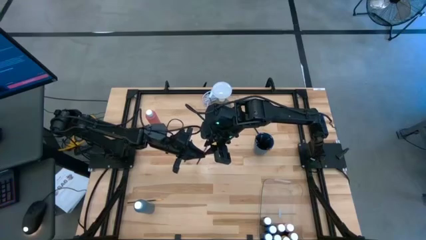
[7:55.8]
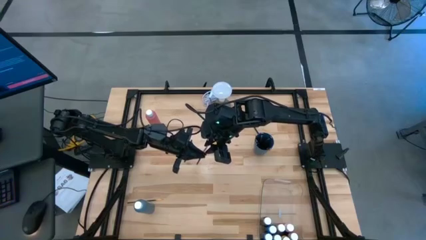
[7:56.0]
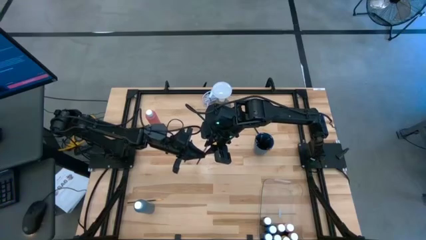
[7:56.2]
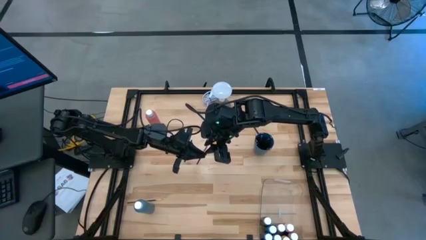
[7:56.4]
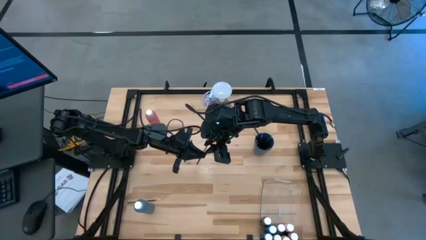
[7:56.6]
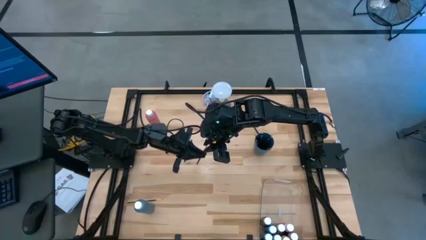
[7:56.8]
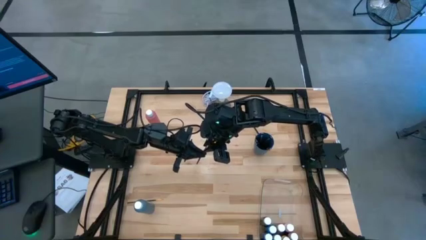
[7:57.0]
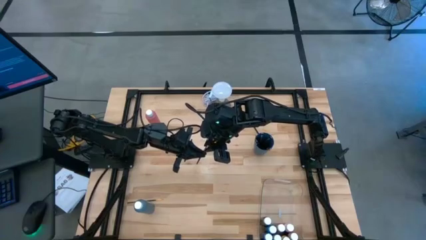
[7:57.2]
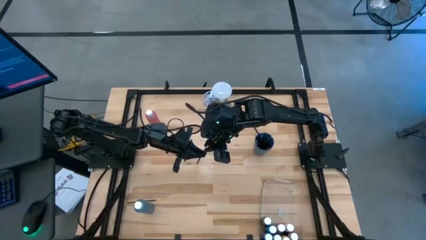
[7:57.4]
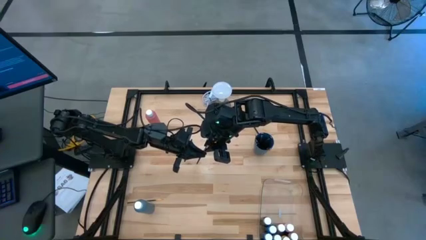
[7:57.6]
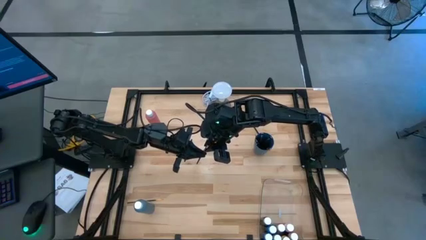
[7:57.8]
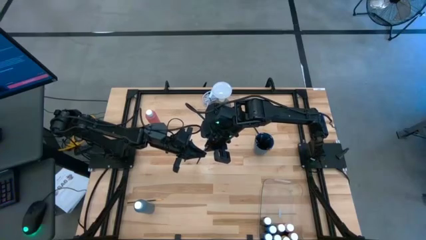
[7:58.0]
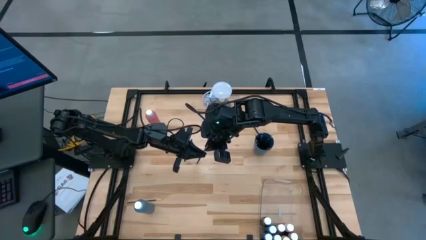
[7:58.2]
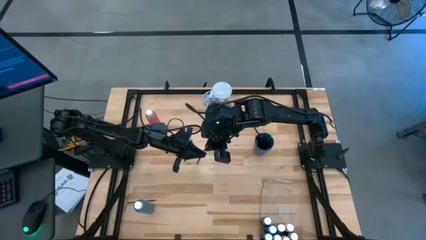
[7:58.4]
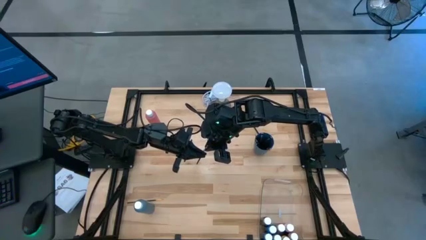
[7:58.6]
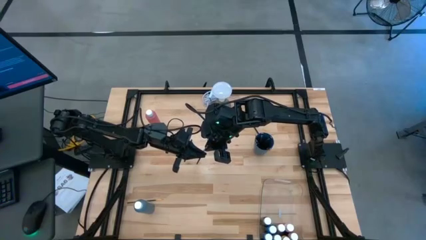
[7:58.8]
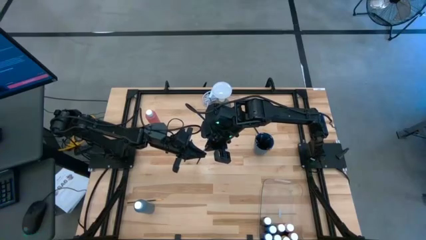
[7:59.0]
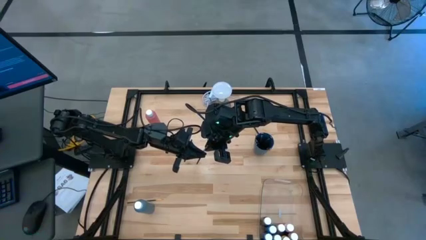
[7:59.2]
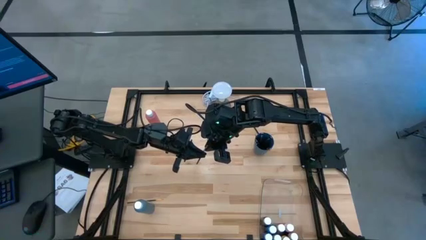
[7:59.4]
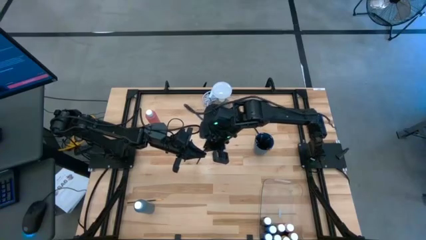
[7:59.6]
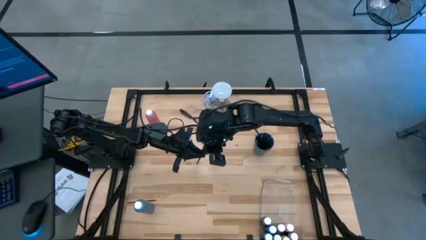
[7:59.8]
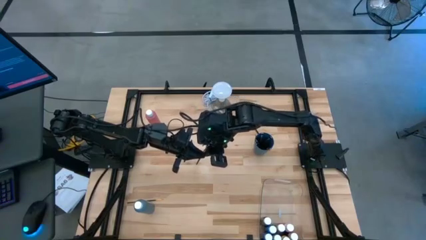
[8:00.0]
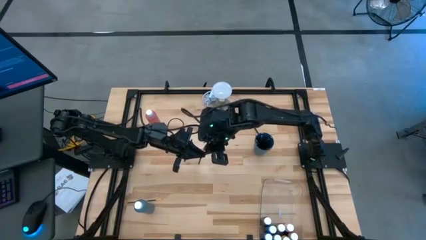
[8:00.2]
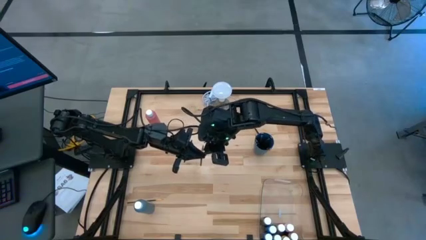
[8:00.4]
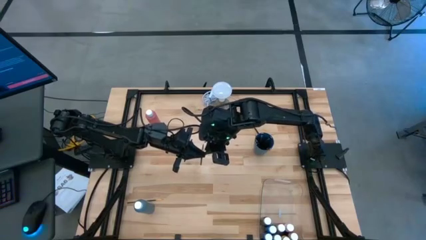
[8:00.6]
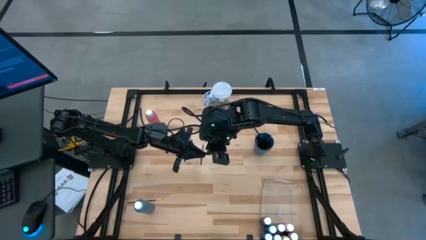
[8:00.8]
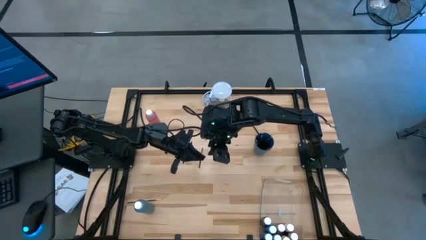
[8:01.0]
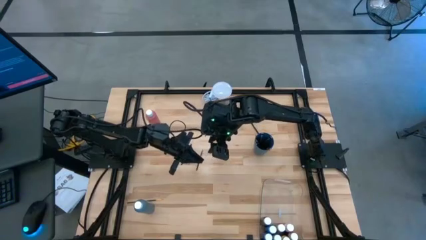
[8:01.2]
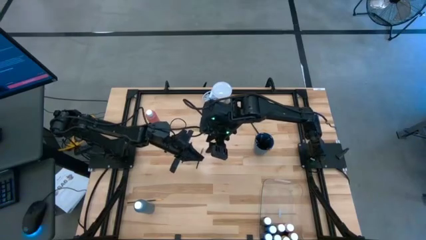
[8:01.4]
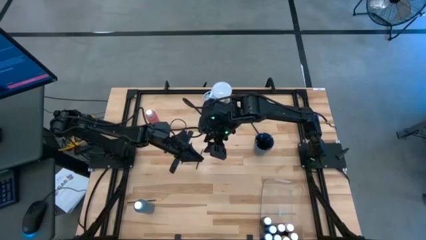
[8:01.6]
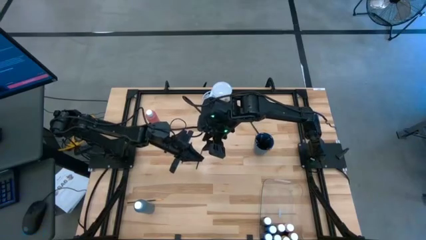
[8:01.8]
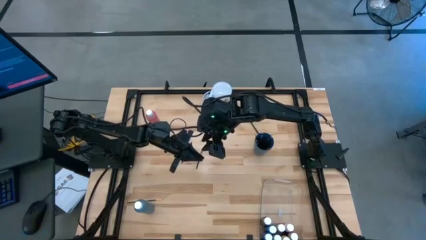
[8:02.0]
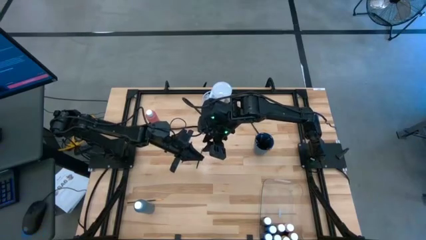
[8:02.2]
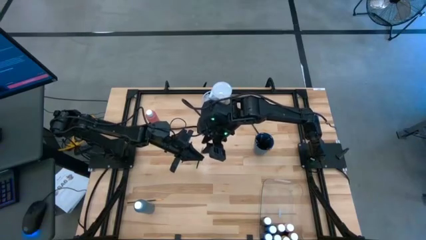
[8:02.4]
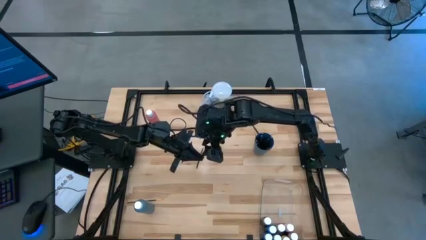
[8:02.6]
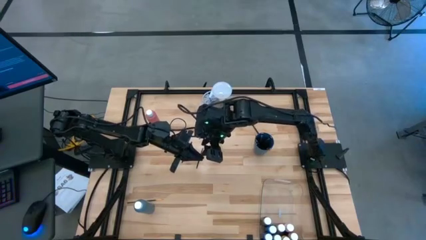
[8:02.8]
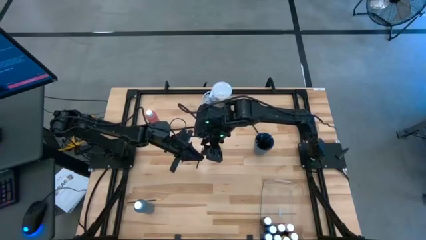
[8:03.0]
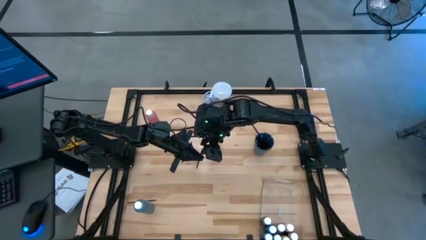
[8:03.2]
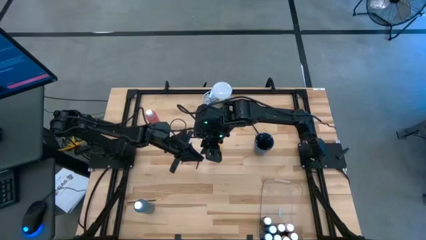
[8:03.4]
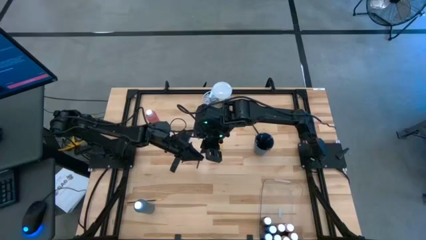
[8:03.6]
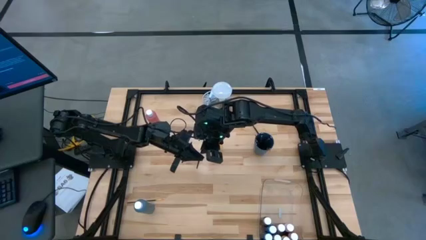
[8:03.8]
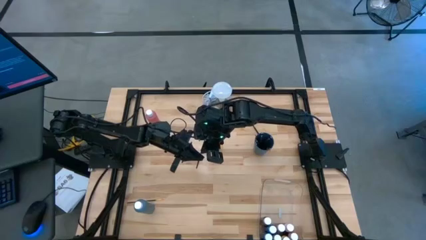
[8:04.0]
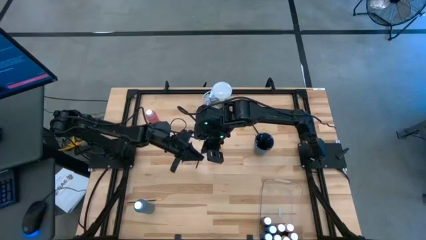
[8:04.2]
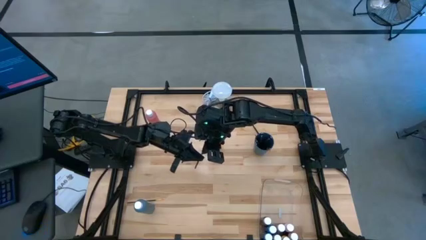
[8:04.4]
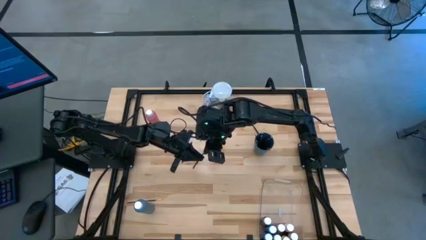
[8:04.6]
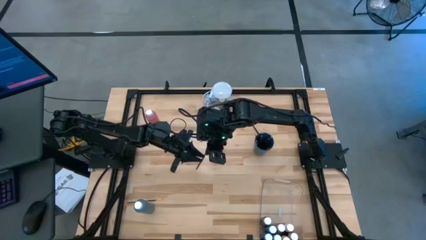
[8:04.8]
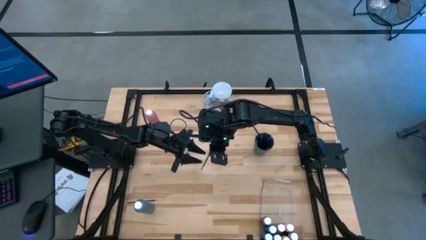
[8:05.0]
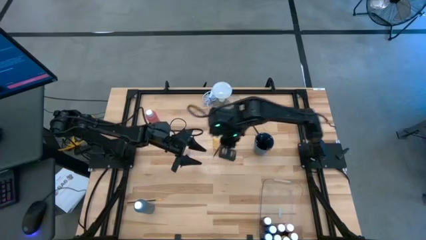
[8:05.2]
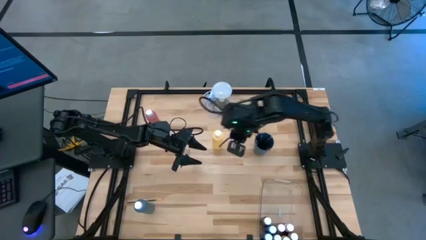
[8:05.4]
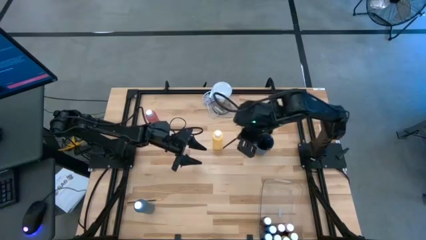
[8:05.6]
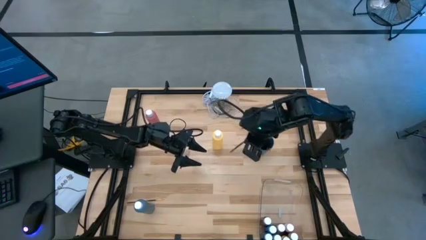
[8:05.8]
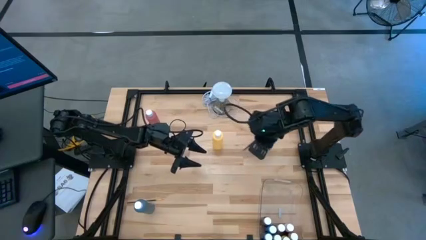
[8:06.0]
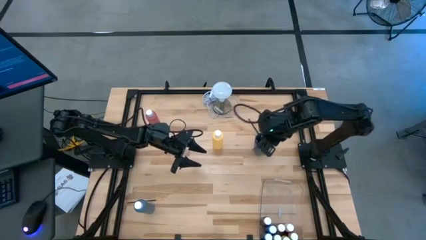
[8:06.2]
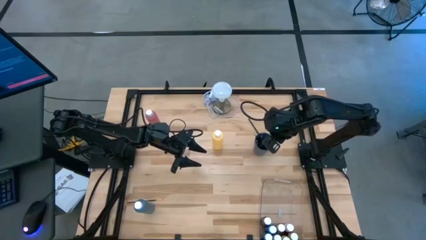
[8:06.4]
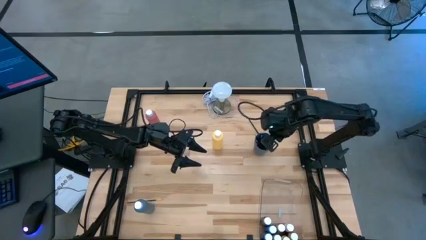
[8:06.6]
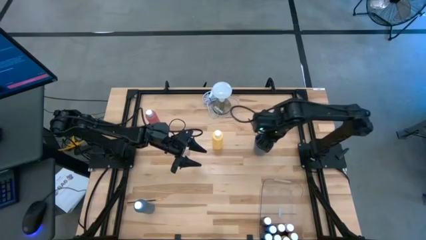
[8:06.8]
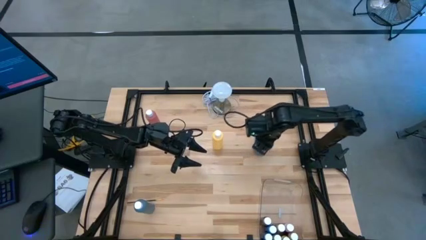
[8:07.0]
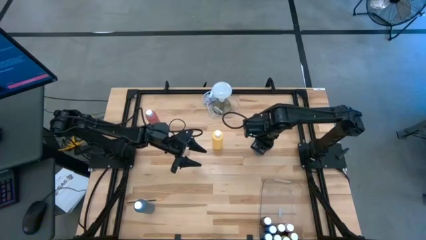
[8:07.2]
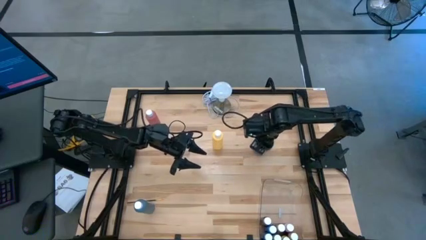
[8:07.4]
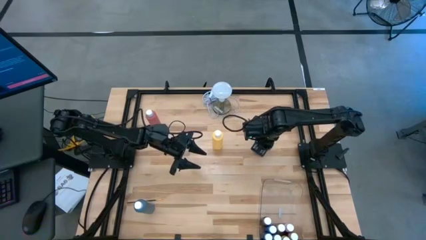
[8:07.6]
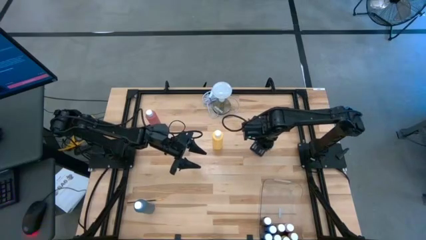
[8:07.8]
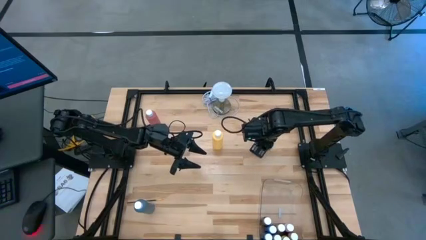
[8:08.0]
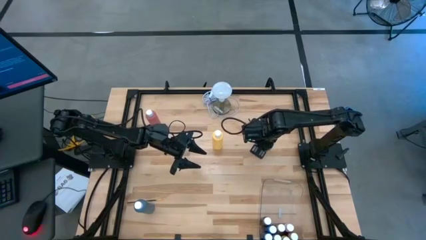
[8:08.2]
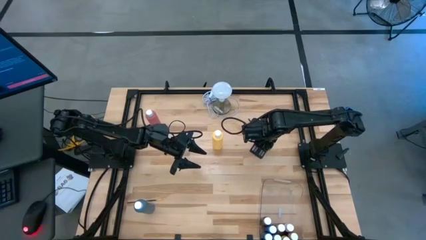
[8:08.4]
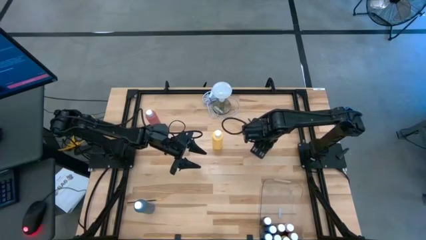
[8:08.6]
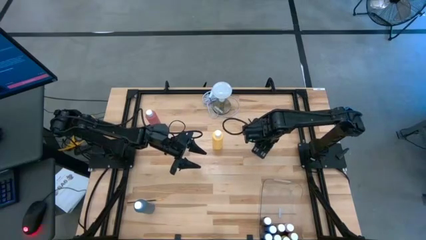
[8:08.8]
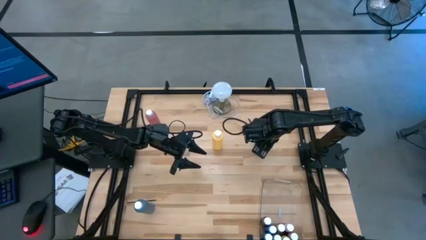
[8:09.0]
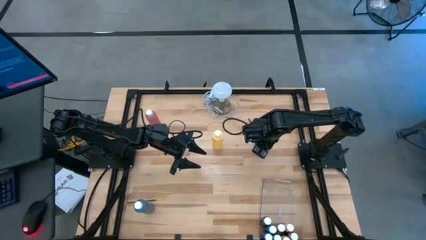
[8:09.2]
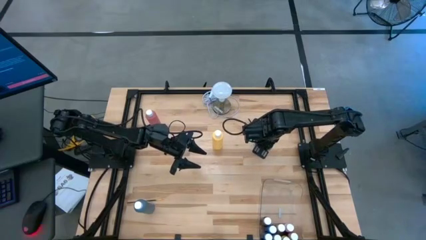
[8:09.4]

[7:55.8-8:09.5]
Task: Pick & Place Paint Supplies
Put the left black silver paintbrush into the blue cup
